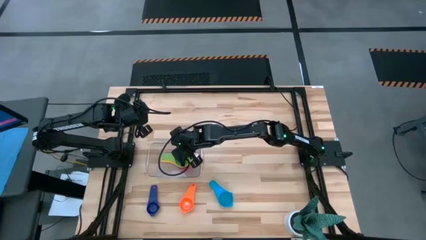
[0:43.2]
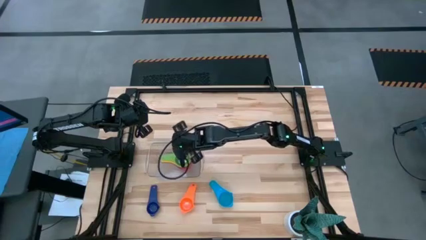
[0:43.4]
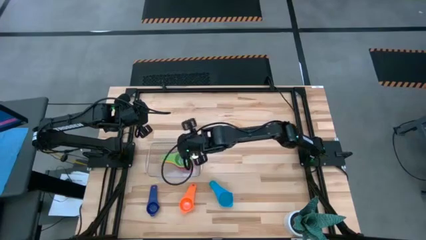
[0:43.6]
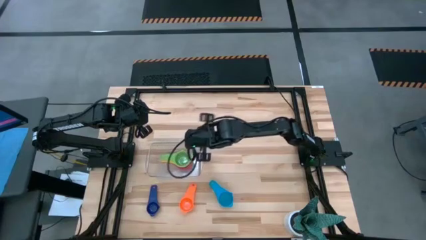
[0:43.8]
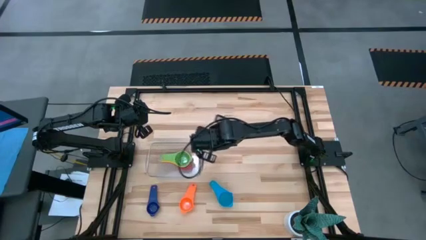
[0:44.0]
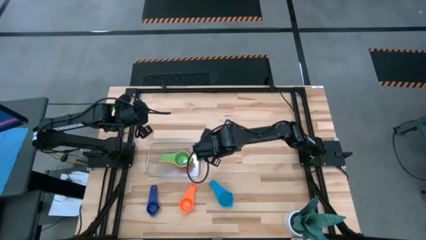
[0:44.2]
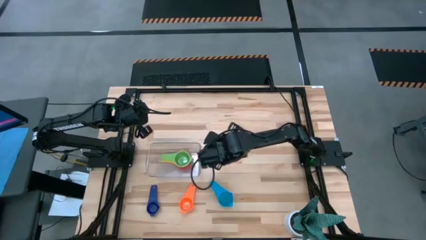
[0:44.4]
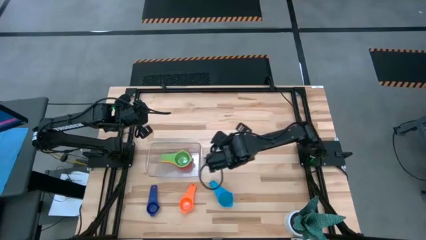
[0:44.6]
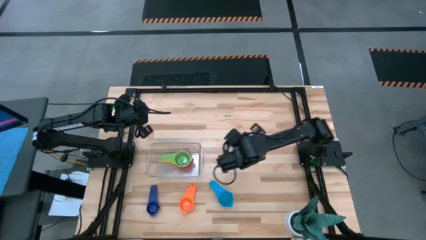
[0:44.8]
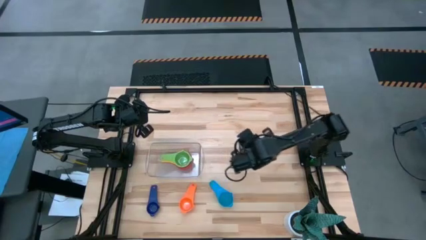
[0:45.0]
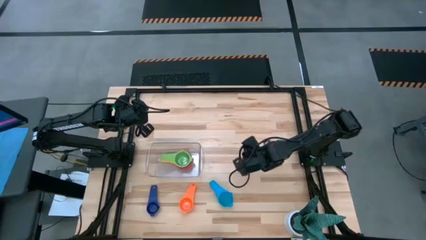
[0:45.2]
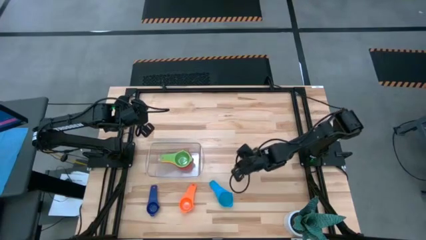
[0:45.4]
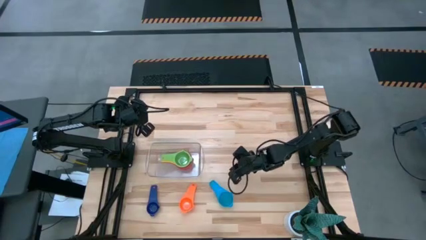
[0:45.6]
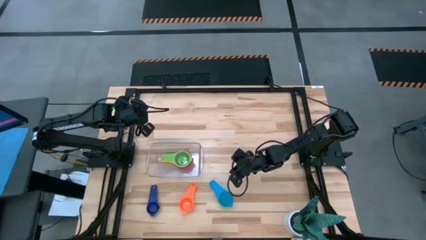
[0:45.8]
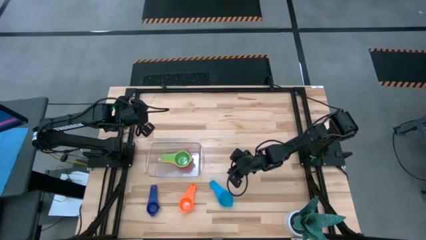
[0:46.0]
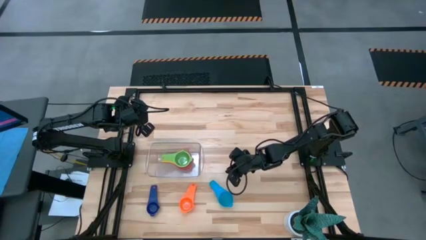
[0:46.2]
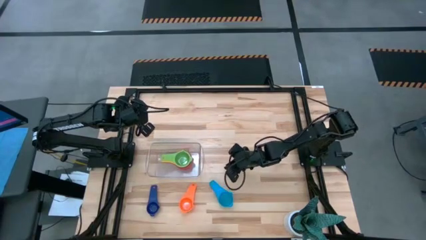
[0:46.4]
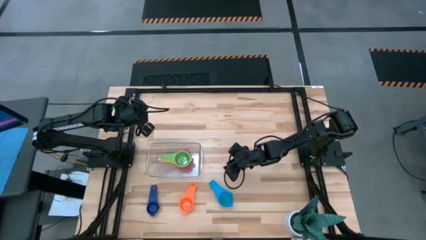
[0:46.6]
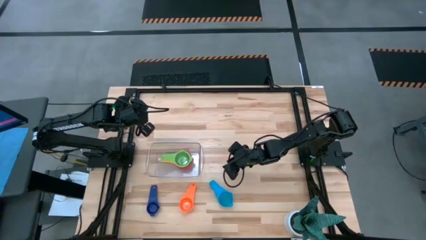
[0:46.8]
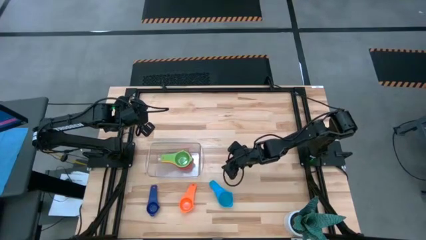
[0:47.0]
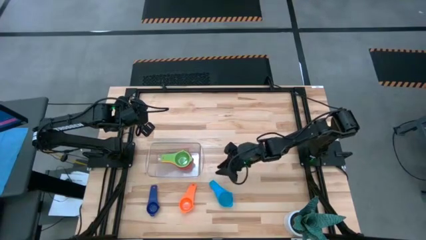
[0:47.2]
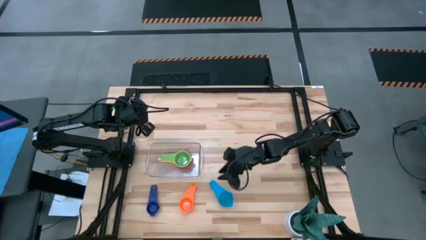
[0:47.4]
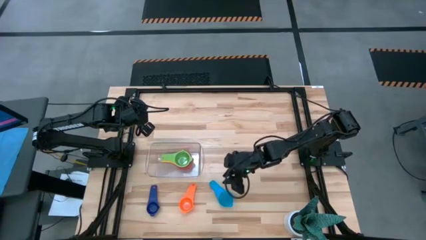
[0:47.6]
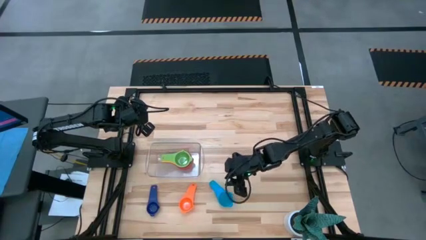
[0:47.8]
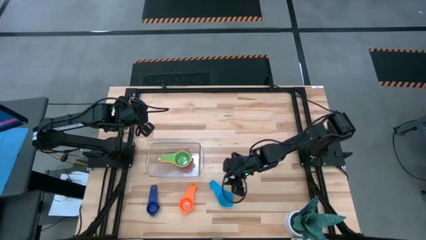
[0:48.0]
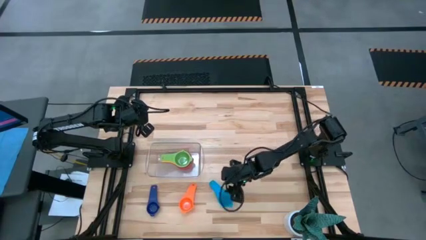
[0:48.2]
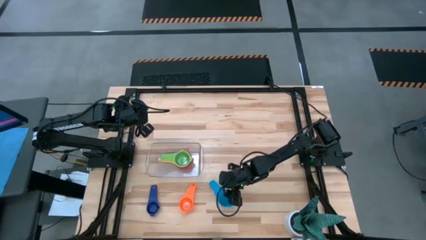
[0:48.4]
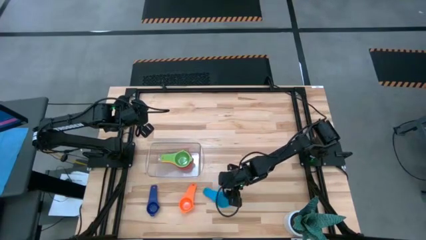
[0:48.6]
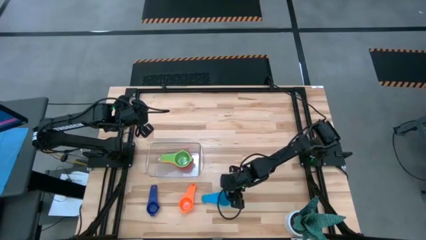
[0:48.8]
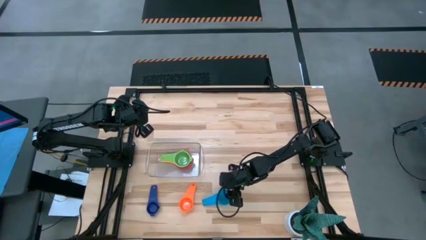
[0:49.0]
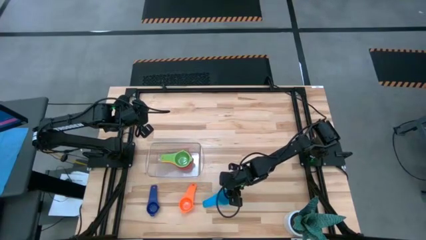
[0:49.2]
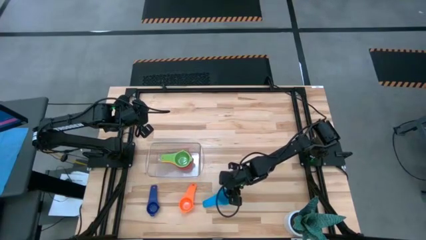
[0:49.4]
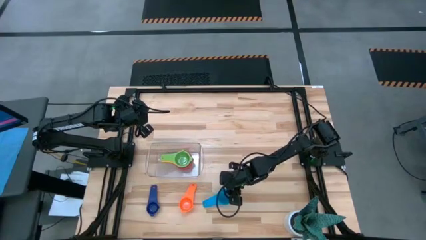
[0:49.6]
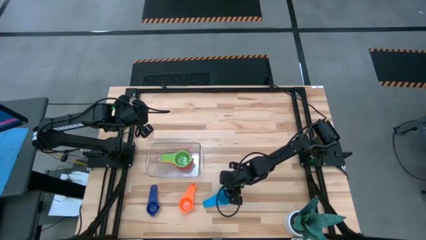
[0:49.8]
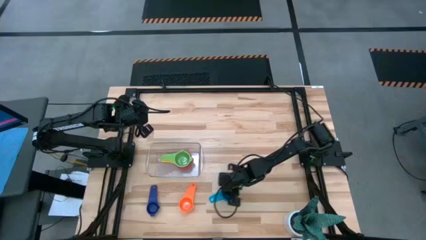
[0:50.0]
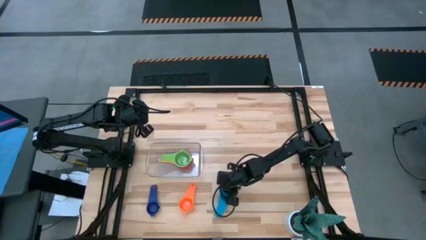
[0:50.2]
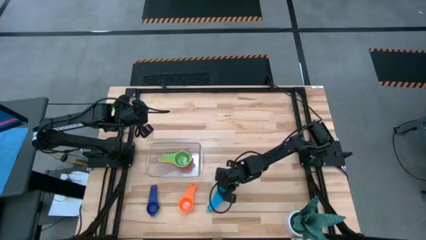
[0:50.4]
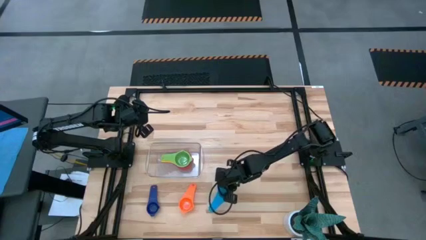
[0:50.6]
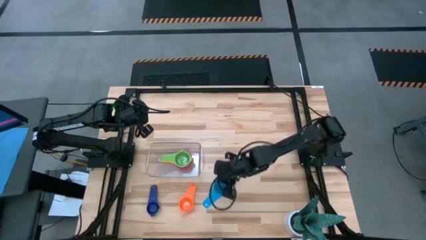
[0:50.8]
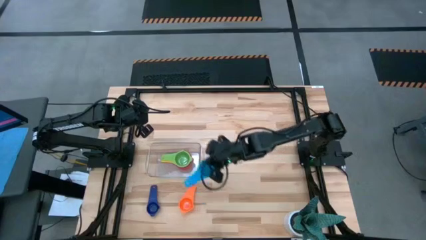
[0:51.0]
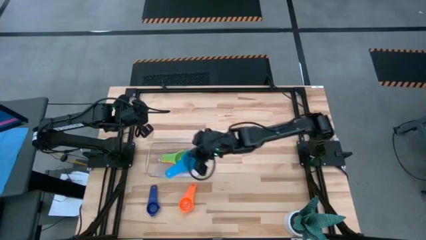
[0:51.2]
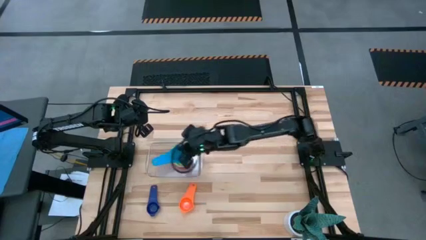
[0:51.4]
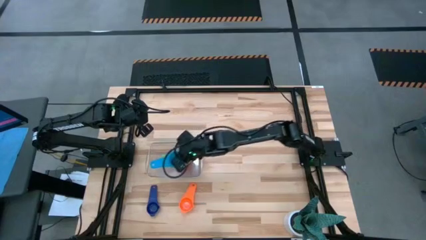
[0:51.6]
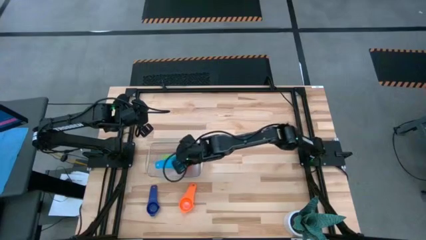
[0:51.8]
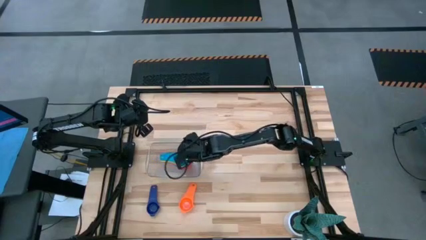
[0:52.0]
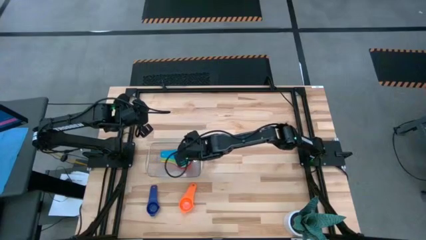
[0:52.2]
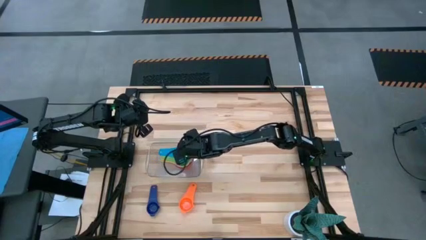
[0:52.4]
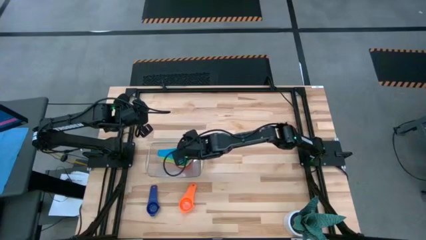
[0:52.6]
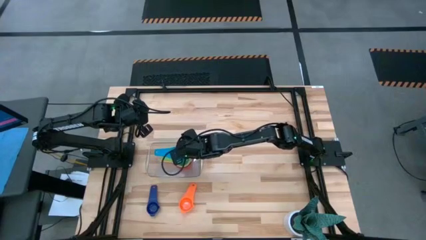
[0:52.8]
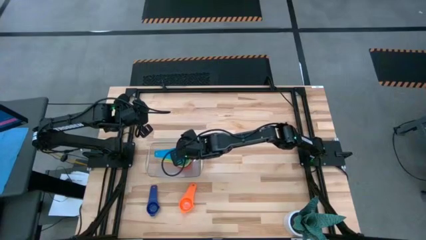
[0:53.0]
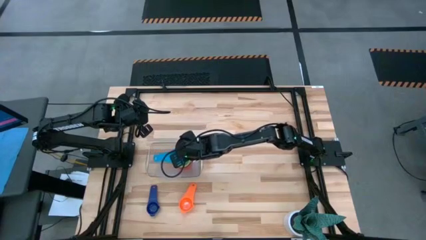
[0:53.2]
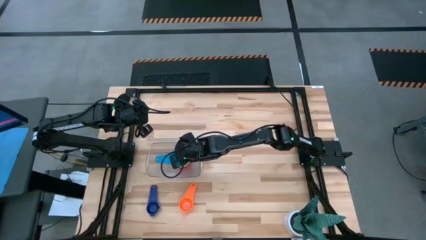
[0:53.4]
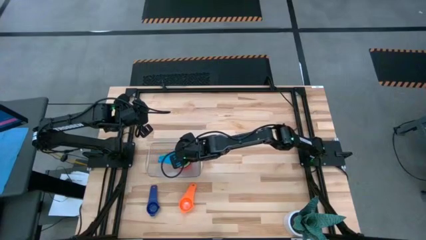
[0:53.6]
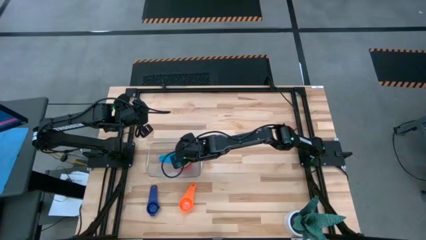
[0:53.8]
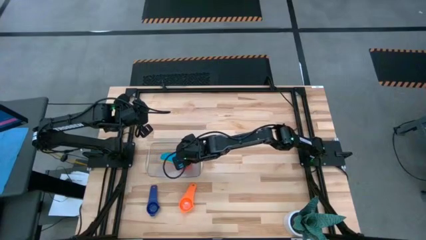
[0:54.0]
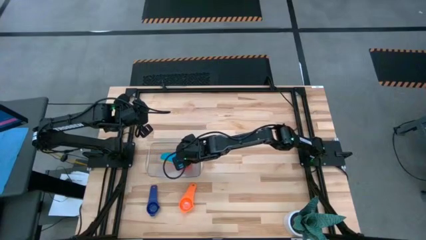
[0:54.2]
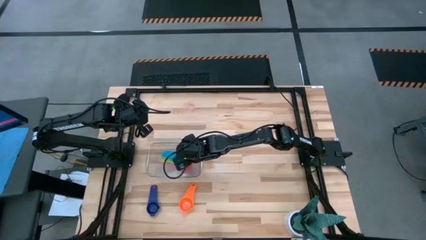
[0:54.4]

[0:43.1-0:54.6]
Task: Nest measuring cups in basket
Stack the light blue measuring cup on top of the green measuring cup in the transparent bin

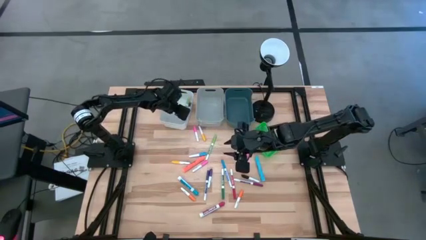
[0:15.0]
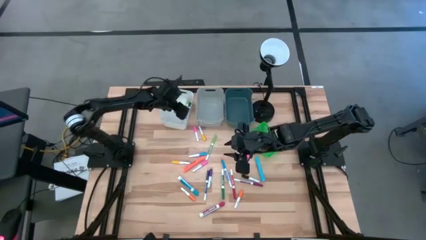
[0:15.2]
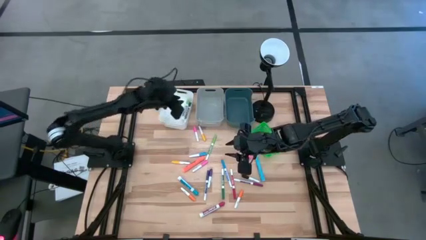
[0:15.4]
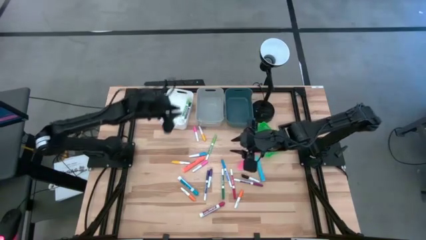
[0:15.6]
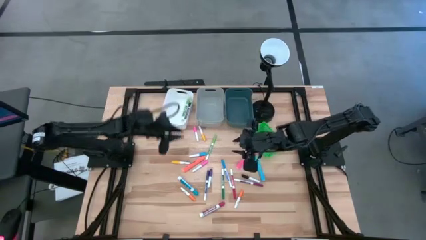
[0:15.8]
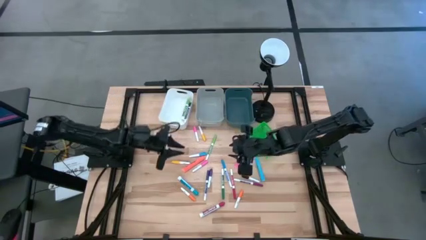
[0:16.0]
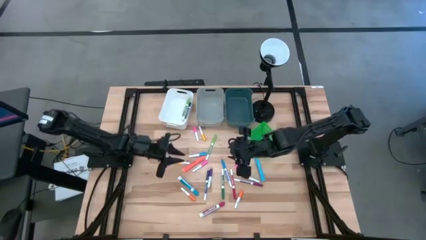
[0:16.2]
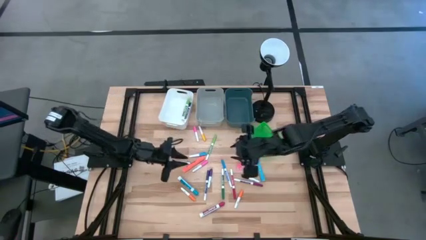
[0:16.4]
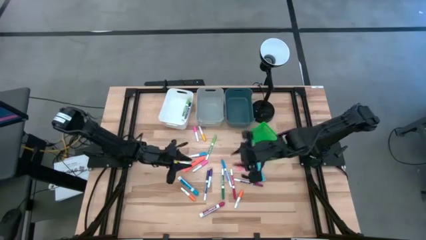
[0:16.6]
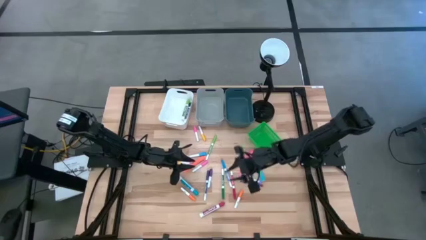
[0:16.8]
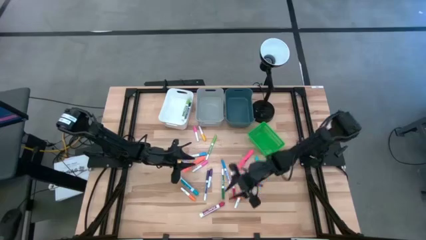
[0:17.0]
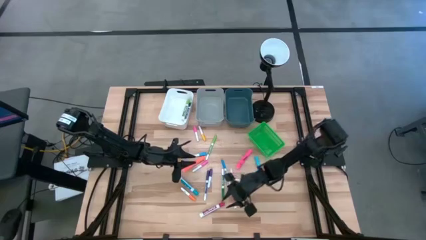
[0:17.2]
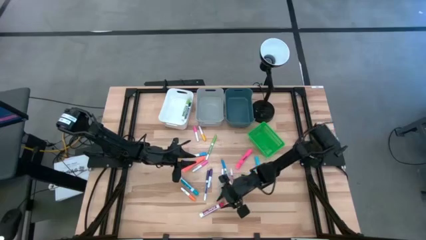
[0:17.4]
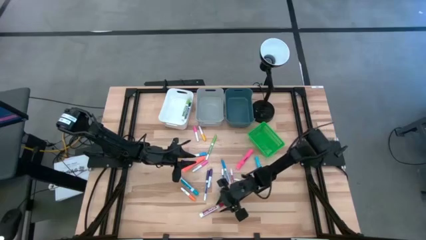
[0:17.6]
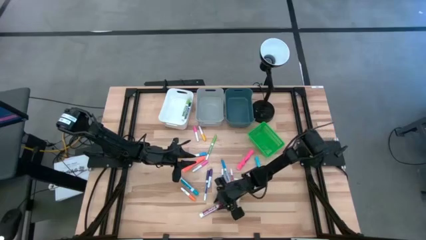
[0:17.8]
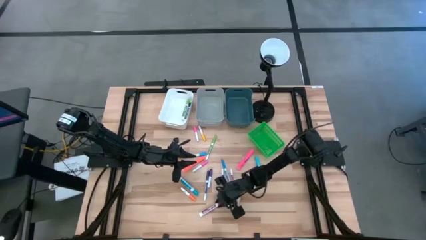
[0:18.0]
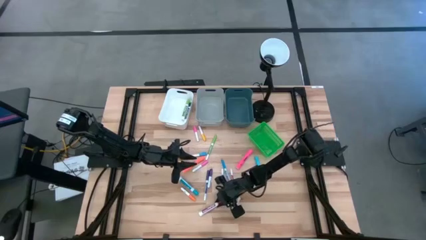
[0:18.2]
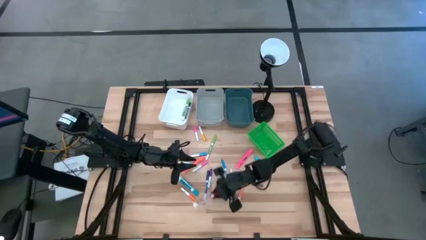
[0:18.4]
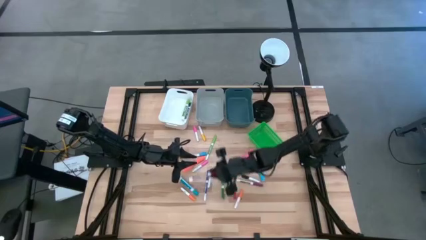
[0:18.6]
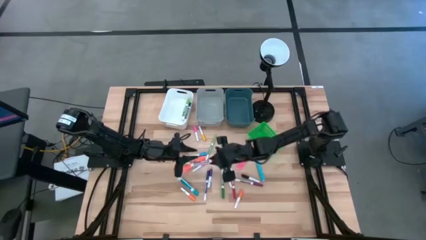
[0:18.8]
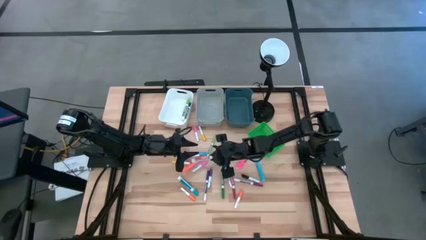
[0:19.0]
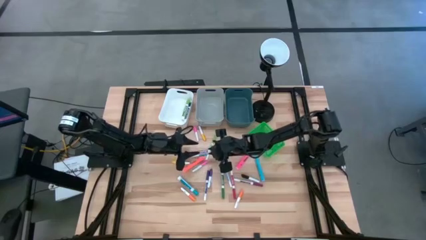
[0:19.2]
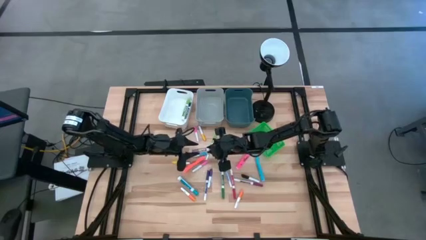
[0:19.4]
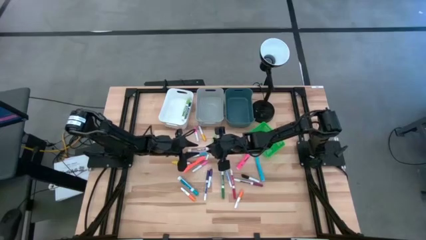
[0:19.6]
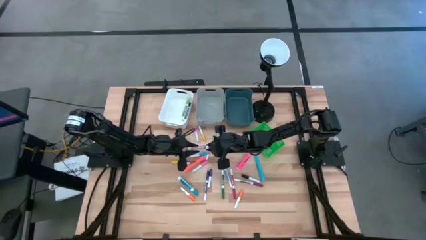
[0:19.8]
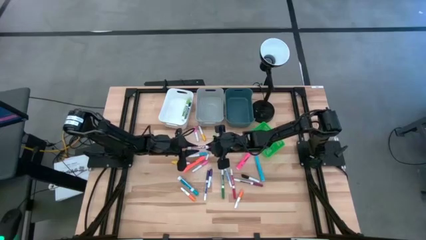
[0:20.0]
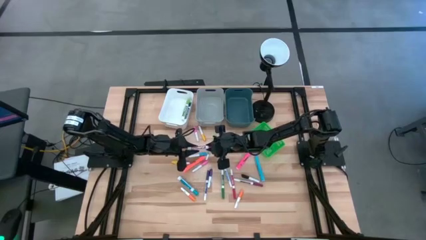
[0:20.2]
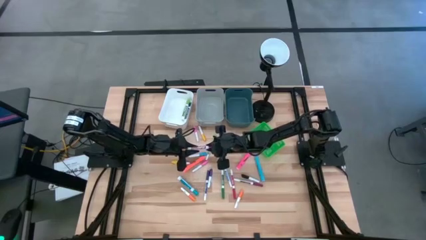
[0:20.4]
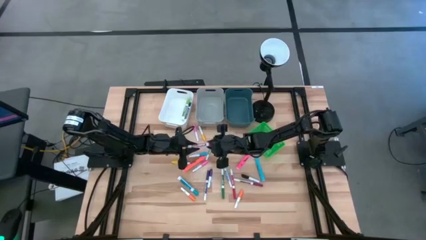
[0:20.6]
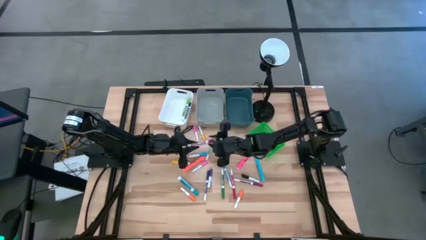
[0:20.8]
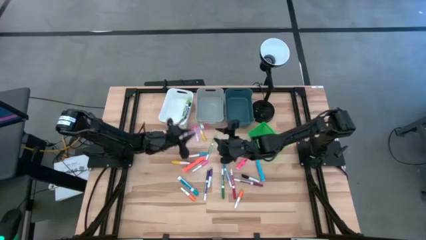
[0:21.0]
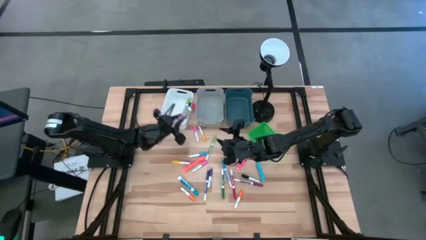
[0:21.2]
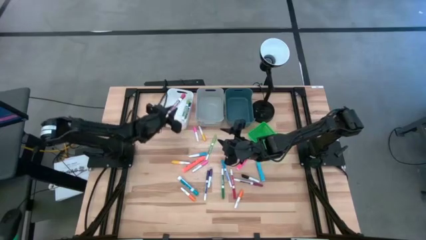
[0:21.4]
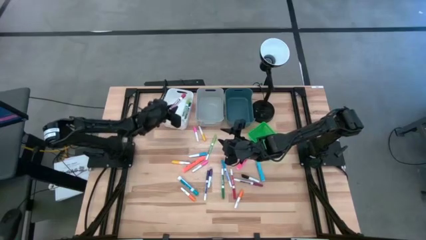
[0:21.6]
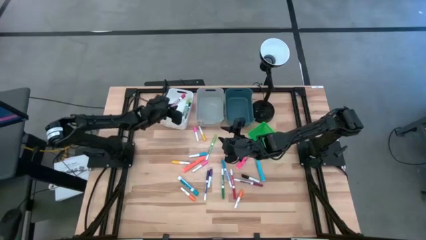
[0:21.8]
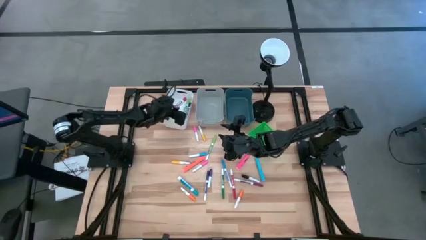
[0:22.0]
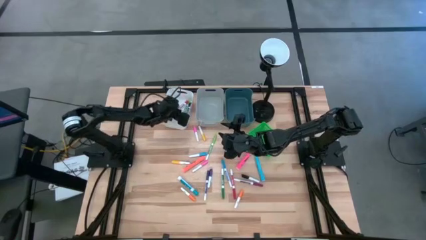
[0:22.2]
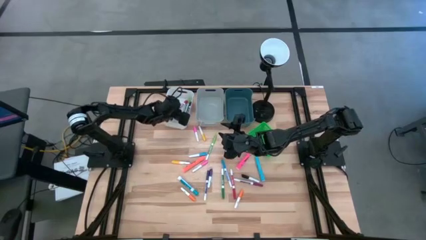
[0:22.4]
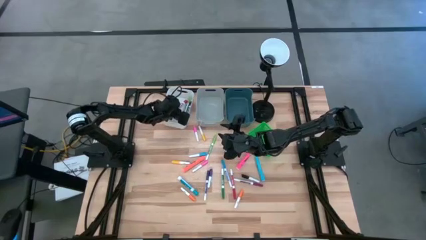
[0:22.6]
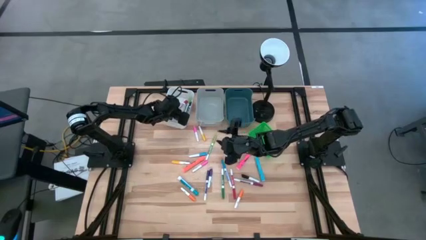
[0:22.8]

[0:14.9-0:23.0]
Task: Pick & Place Markers
Put the red marker pen into the white bin
